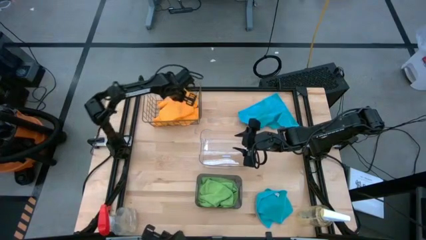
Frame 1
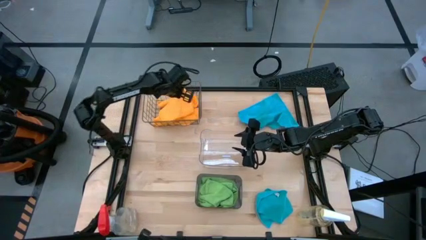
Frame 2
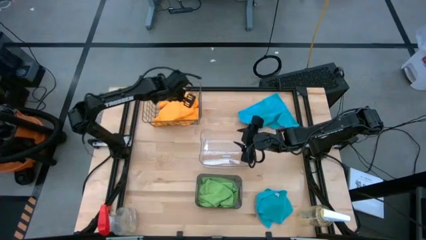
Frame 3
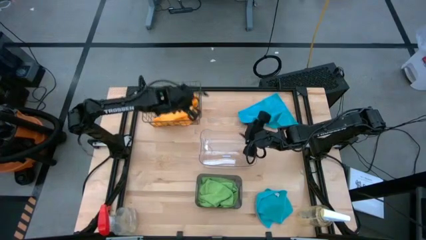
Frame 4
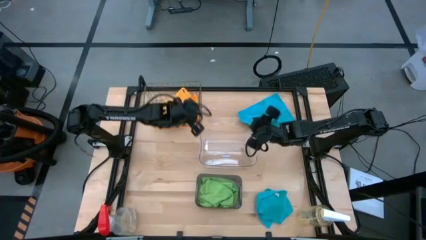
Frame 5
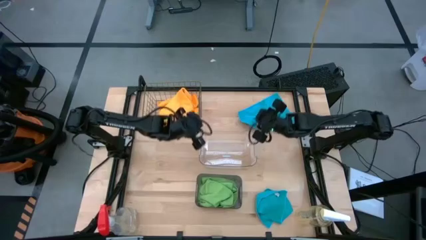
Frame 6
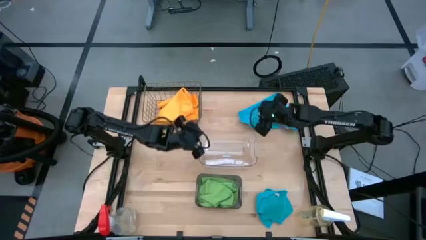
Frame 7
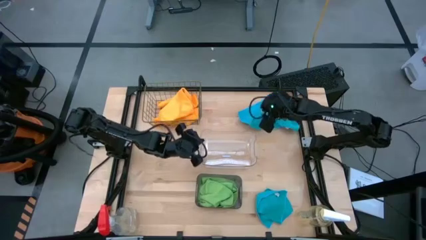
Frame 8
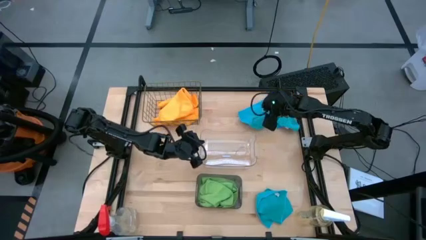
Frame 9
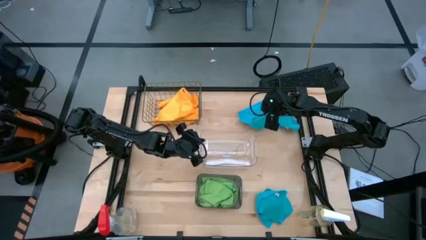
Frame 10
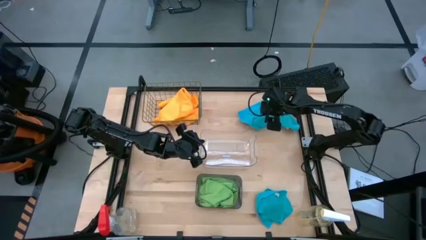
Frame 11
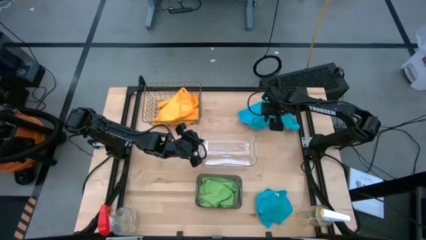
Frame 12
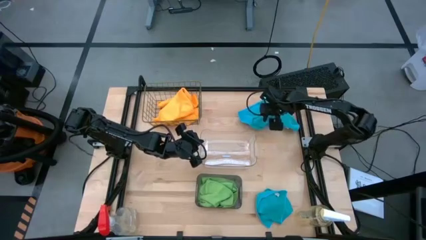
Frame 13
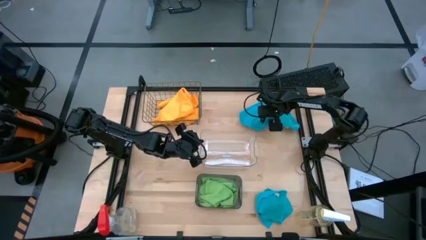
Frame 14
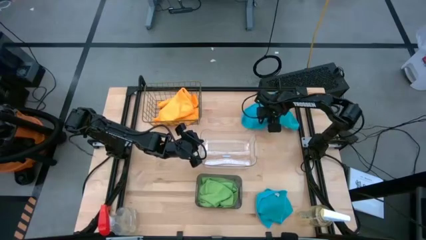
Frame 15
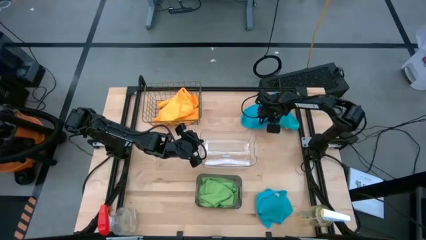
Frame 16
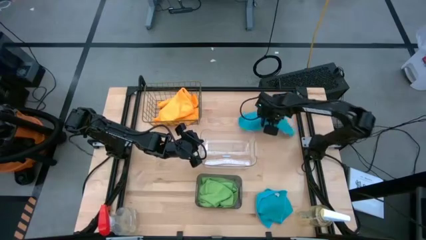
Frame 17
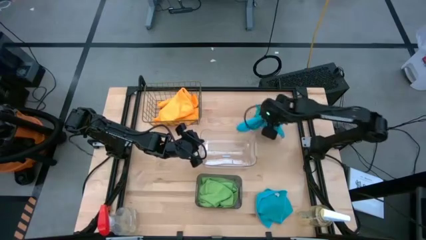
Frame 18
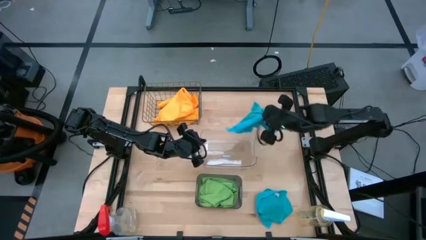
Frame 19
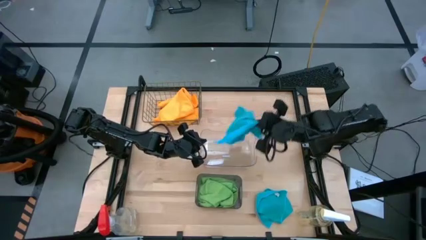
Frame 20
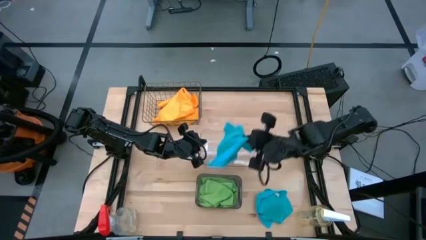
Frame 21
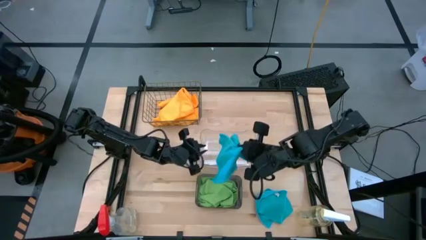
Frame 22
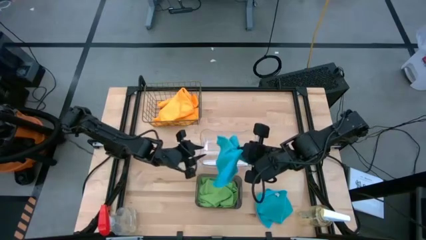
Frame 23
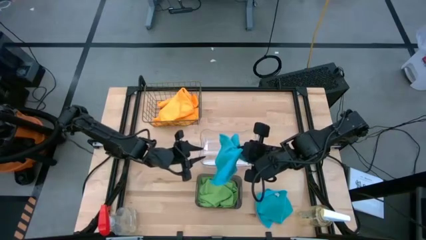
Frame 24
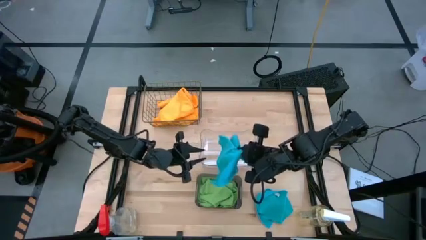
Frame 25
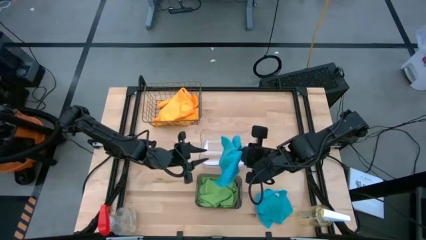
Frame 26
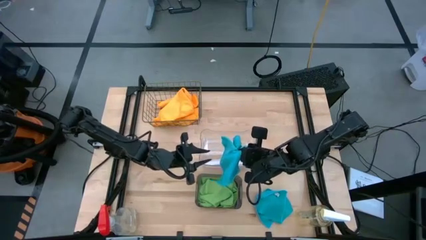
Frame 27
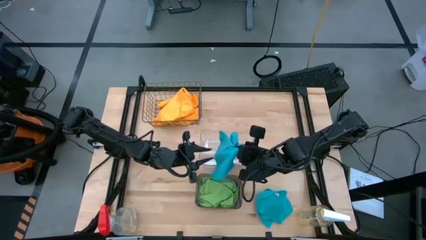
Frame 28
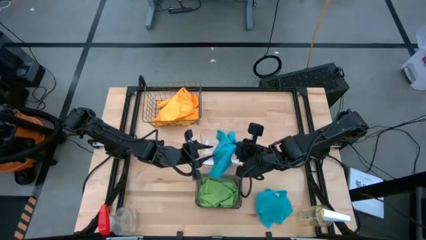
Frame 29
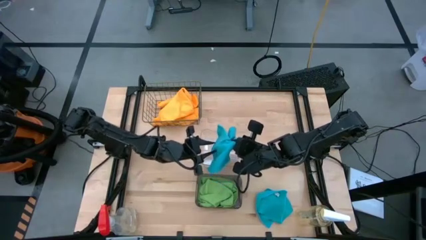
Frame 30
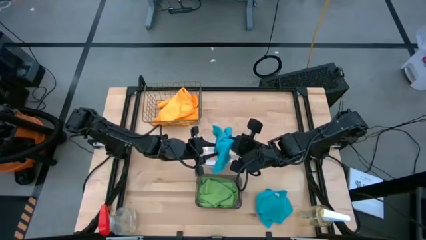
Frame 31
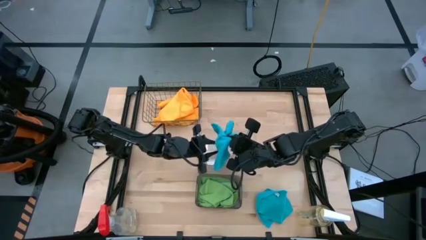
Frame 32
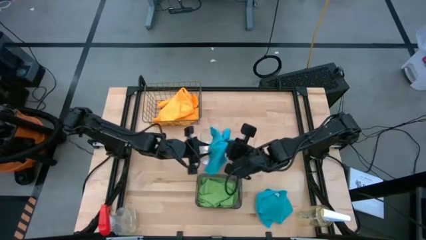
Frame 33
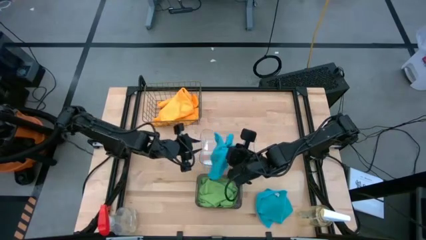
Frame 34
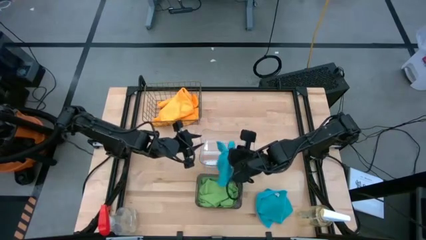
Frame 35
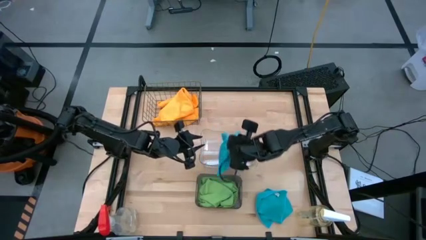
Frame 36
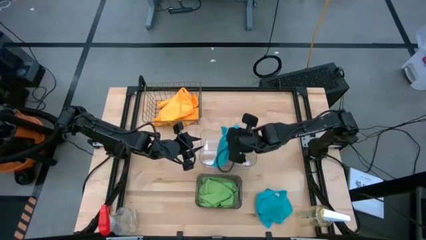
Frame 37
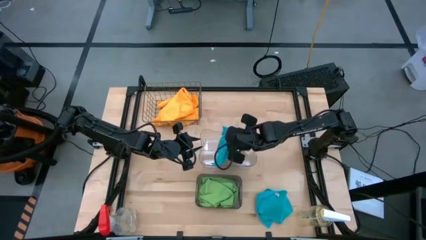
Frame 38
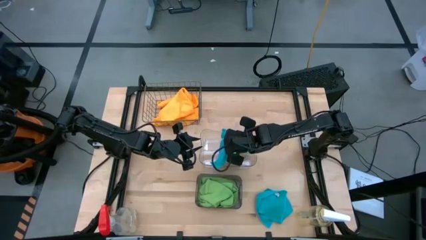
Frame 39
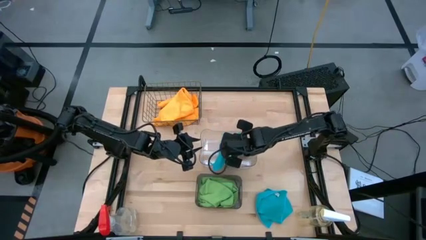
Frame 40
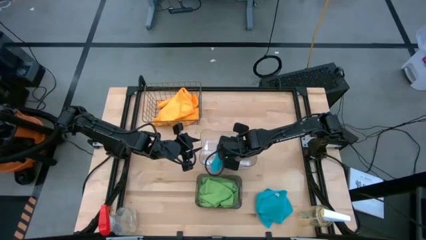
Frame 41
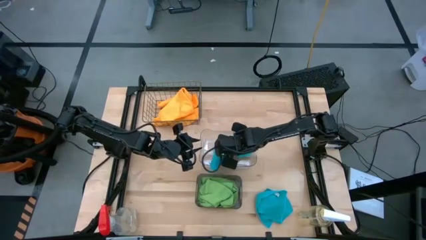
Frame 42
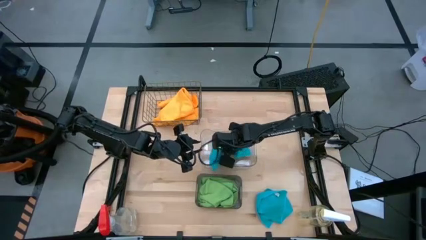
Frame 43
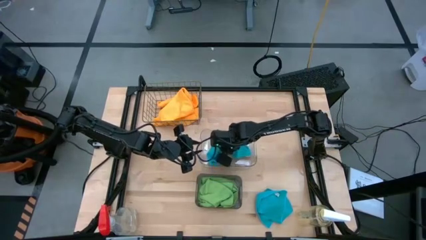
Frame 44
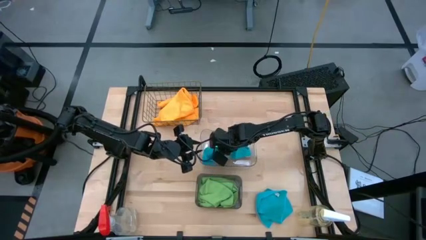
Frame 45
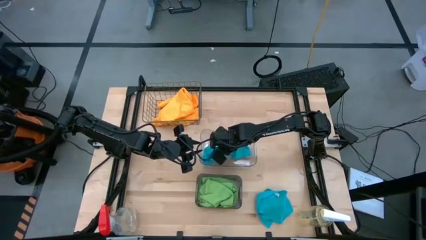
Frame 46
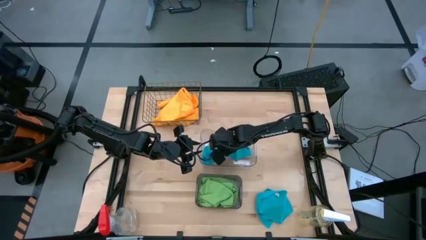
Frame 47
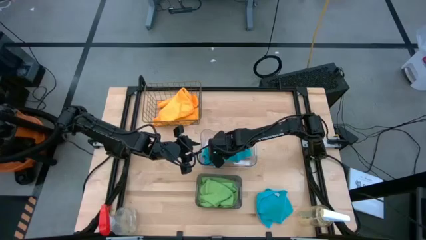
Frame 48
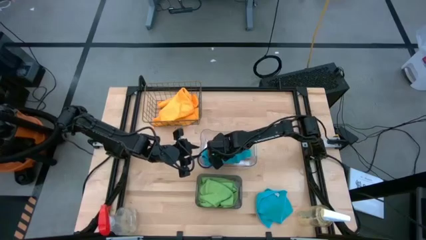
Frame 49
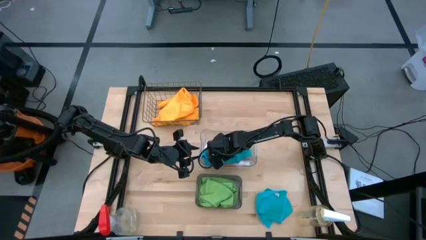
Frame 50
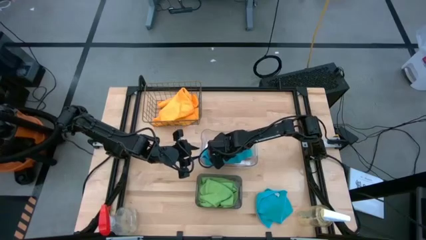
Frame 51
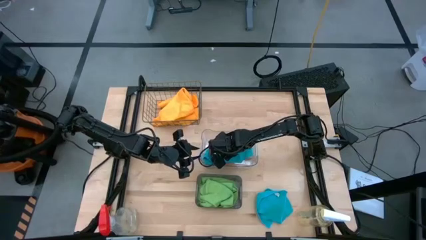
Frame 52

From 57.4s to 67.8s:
Task: Sort microfiber towel by color & place in baskets
Put the top blue towel into the transparent bin

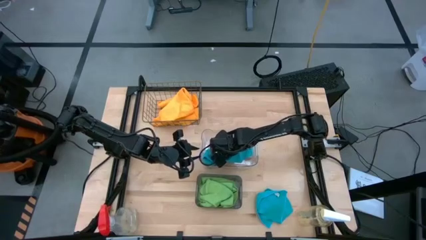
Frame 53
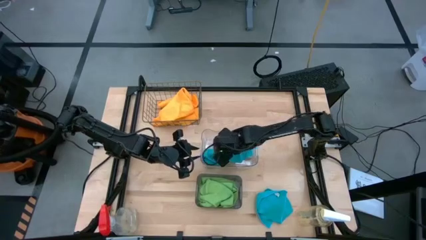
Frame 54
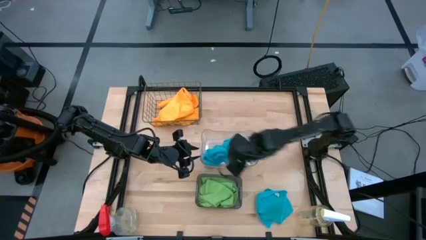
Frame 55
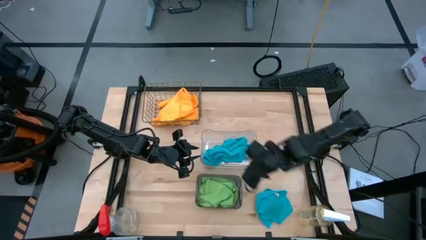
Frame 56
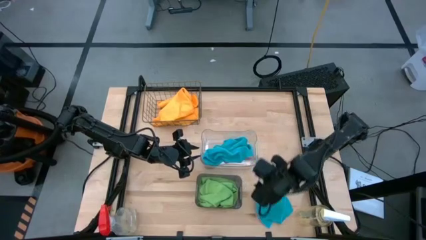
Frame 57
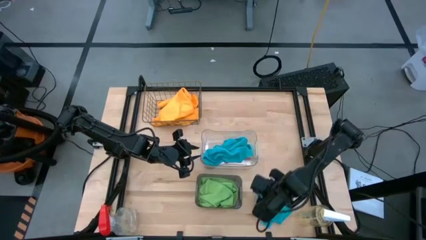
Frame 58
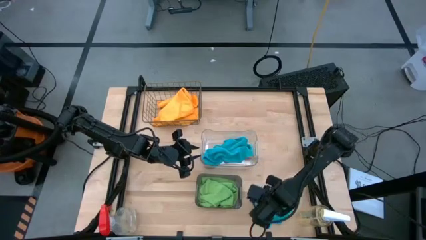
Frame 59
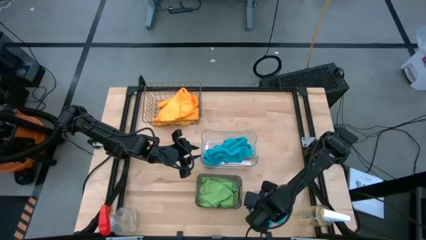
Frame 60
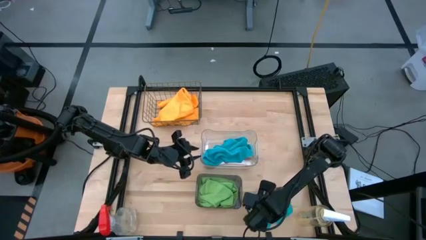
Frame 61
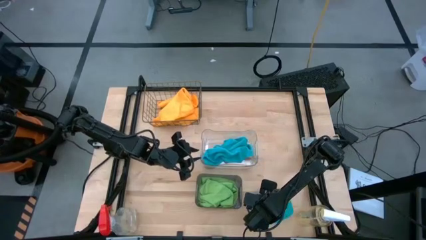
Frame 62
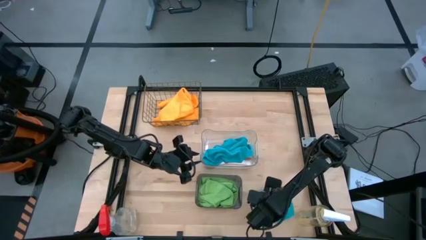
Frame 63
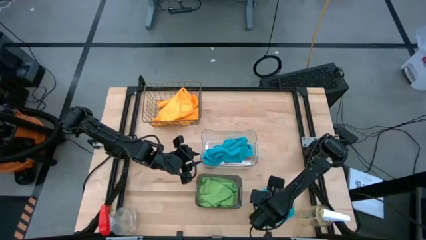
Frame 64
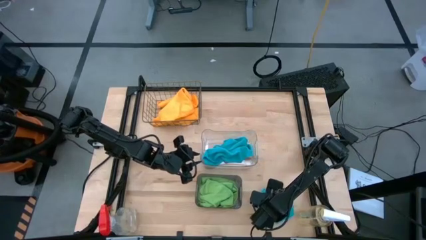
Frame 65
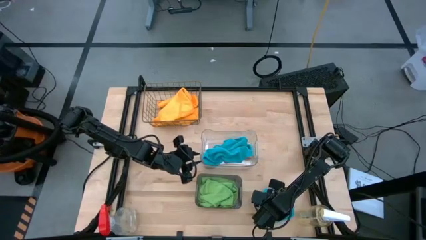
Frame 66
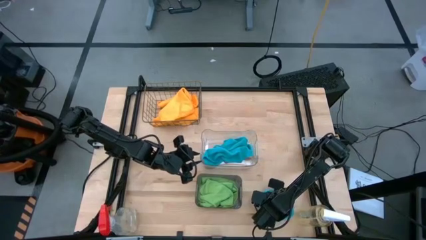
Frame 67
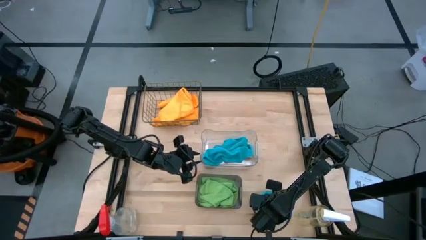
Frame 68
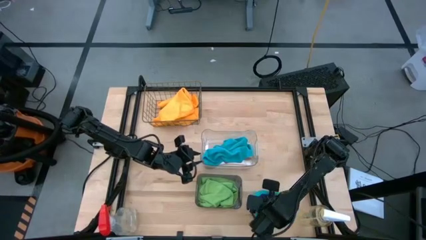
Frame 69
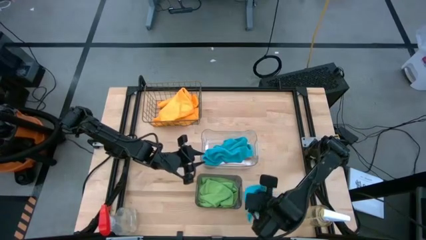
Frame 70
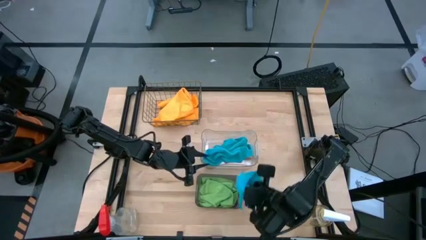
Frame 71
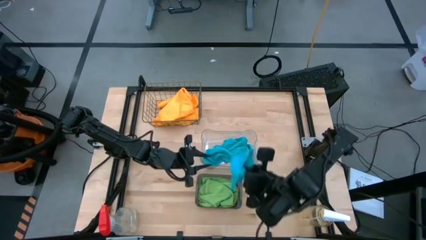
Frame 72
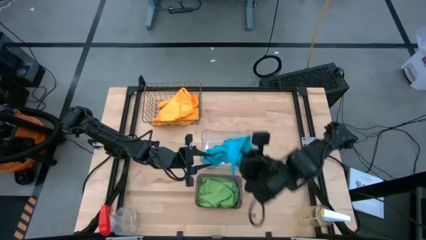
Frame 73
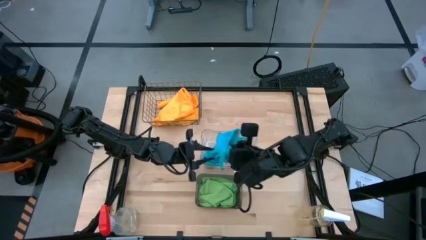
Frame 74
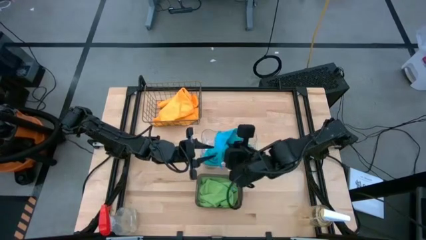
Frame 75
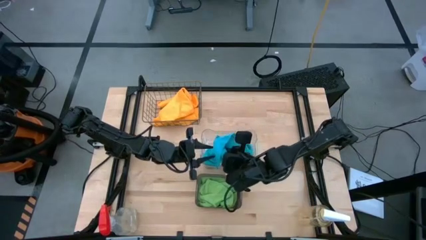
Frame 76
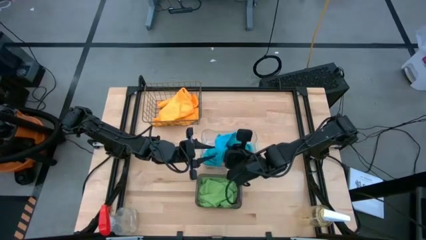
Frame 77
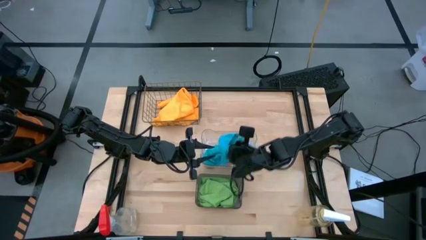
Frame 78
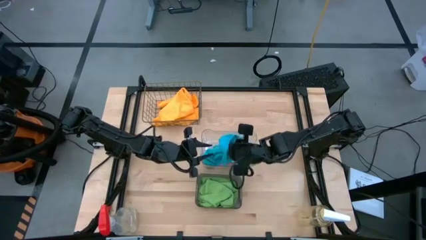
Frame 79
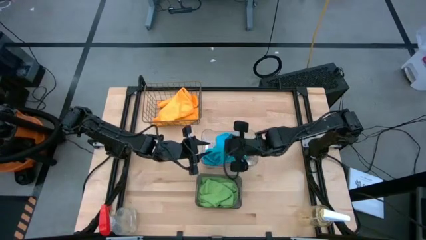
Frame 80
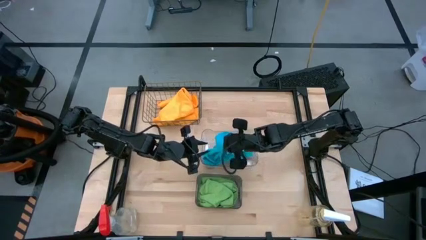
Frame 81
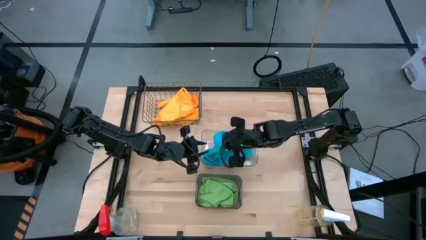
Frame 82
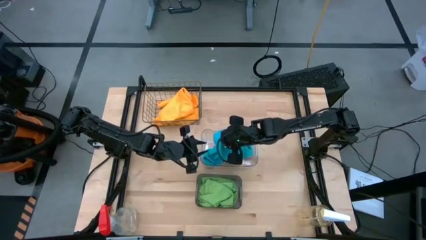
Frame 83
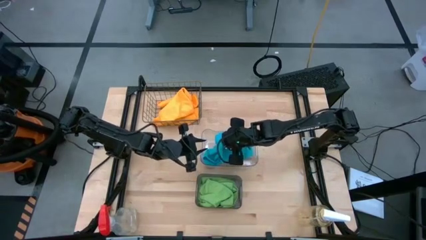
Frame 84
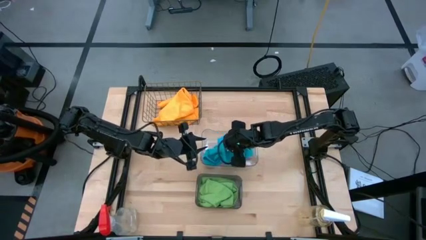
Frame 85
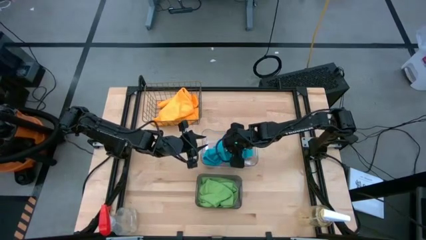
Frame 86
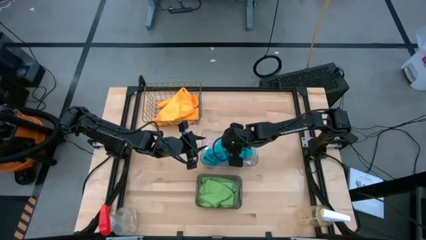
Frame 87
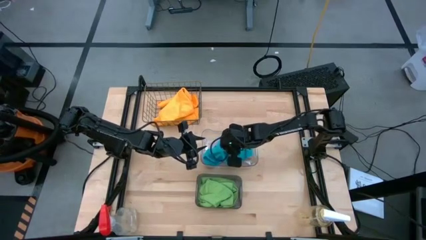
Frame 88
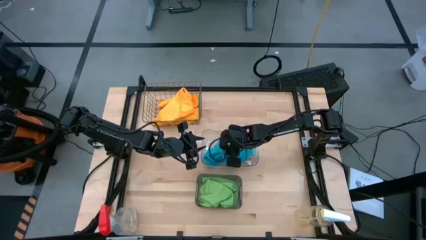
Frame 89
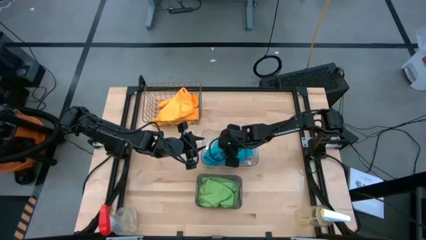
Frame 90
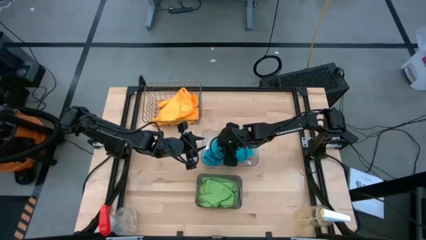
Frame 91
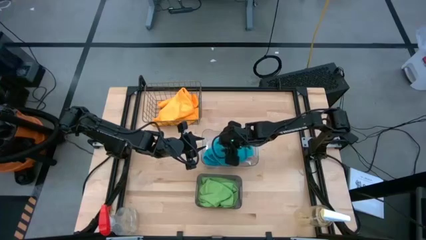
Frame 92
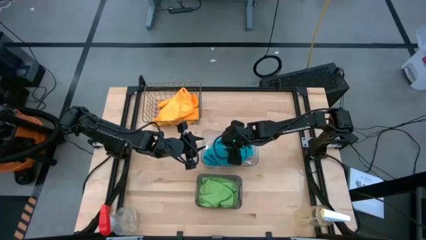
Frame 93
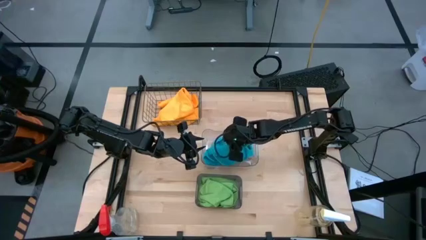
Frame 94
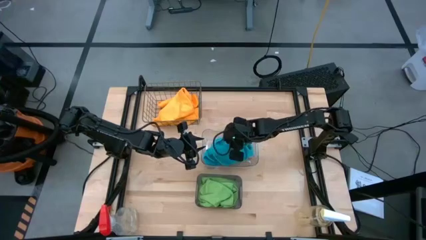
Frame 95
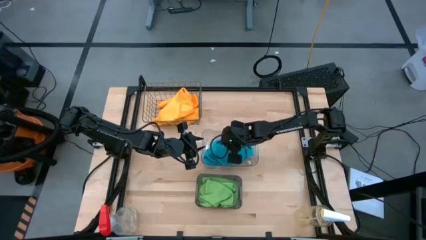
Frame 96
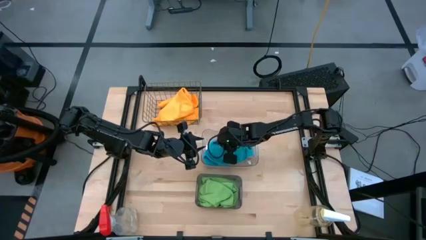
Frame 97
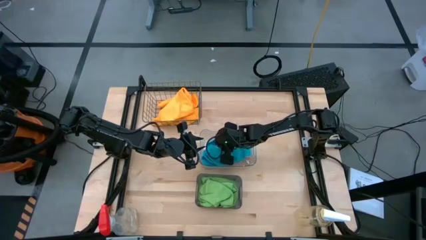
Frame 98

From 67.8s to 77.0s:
Put the blue towel into the transparent bin
